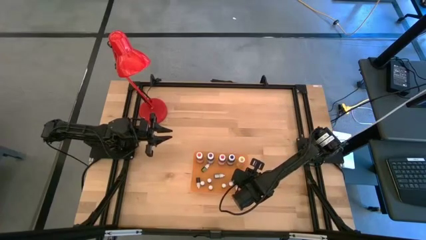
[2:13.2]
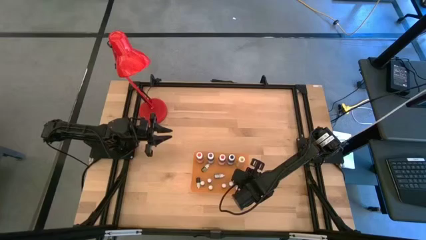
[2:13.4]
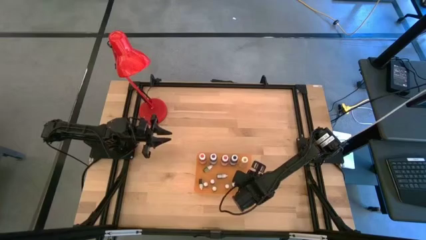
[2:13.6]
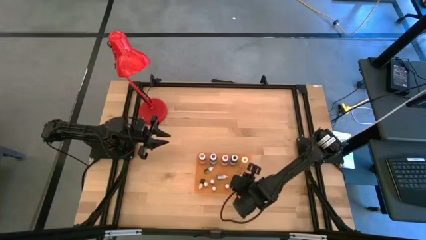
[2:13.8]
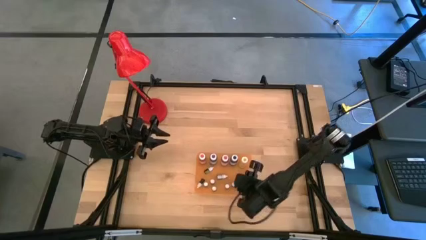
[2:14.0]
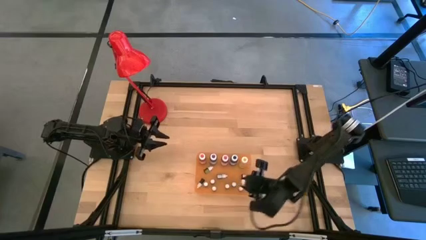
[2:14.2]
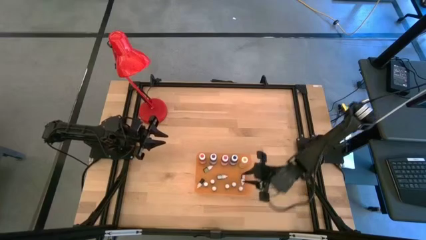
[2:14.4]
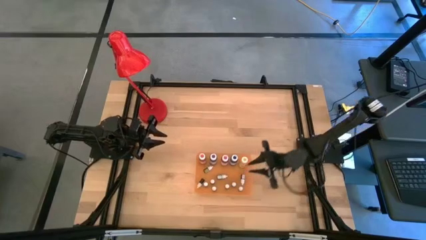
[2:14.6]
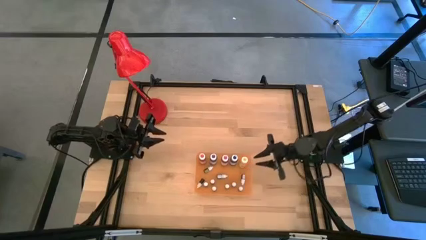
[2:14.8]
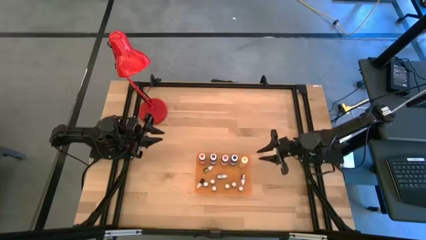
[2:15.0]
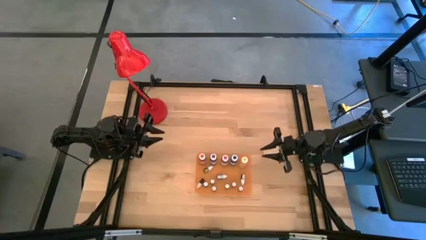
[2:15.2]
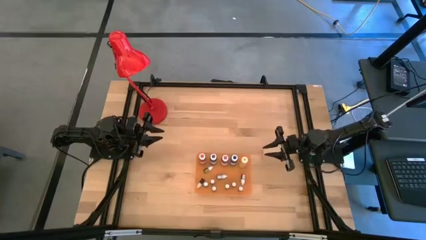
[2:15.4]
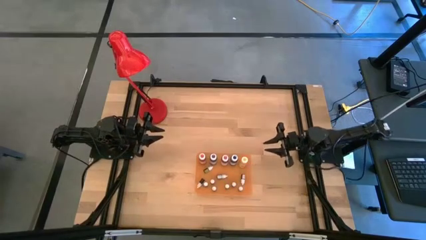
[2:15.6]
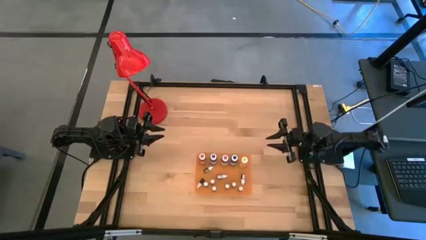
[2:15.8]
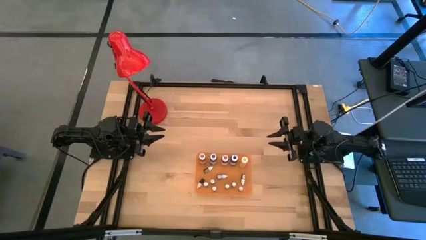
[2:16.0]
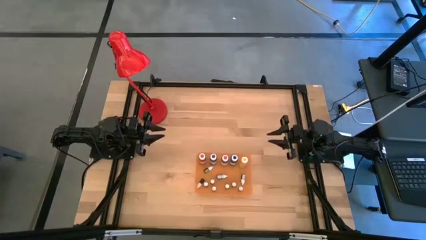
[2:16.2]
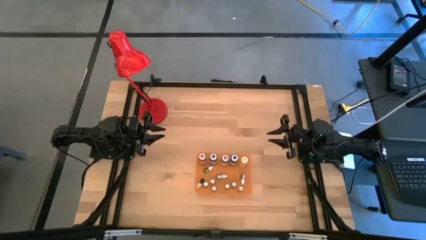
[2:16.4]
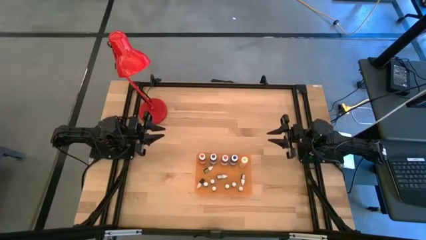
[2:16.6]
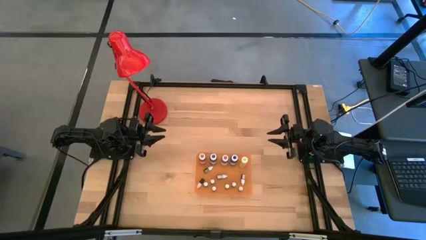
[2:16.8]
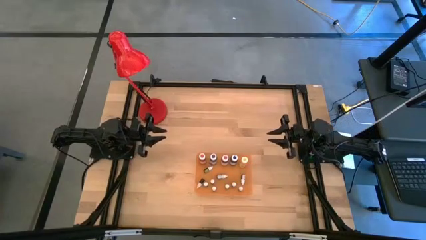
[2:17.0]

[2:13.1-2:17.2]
Task: Pick & Place food coloring
Return to Home Position

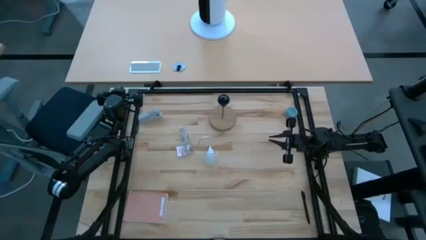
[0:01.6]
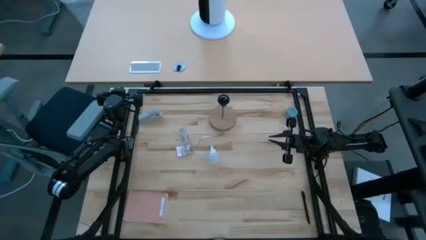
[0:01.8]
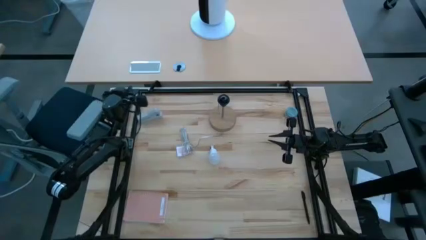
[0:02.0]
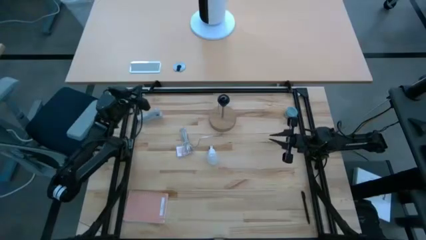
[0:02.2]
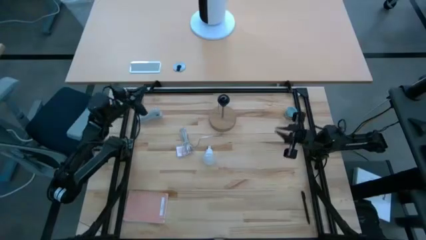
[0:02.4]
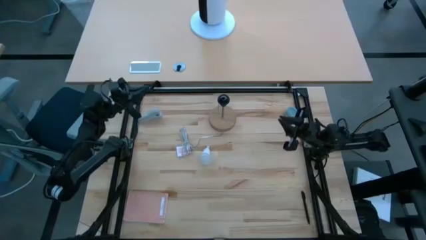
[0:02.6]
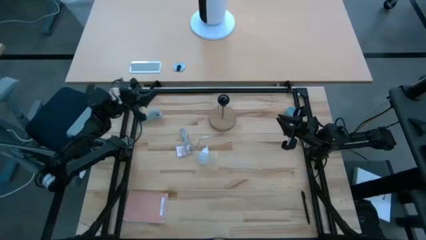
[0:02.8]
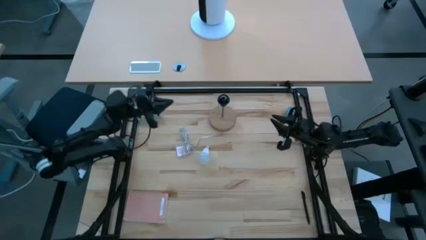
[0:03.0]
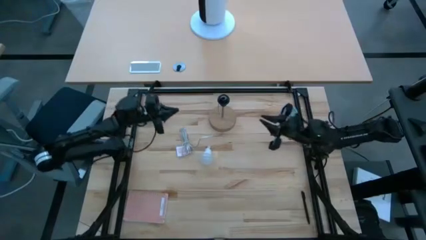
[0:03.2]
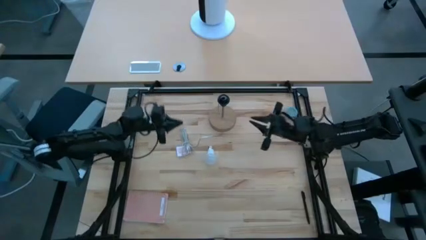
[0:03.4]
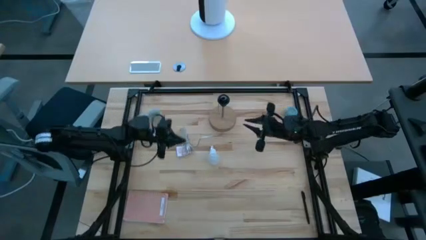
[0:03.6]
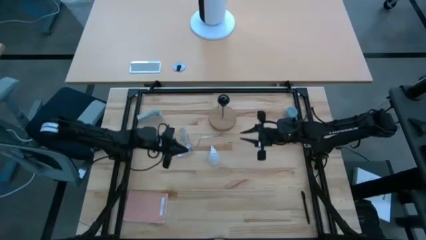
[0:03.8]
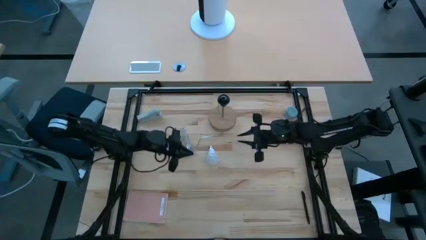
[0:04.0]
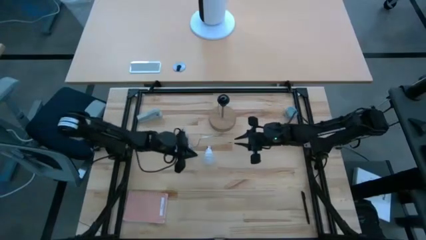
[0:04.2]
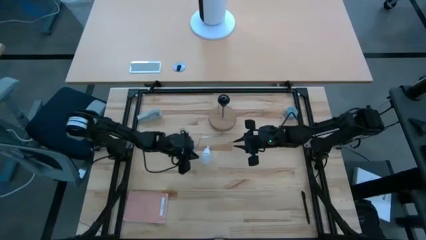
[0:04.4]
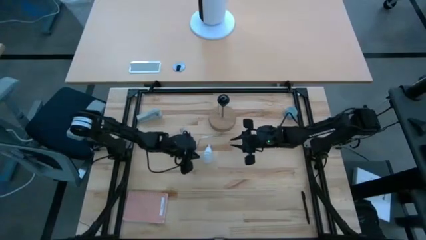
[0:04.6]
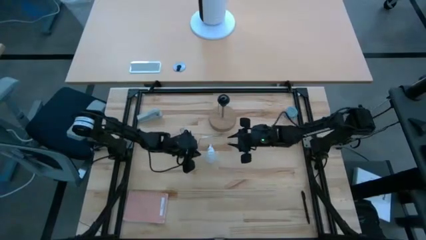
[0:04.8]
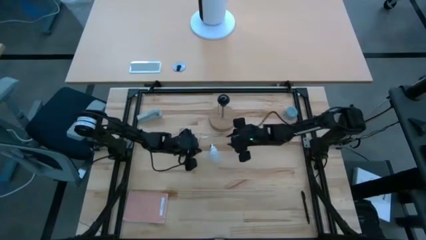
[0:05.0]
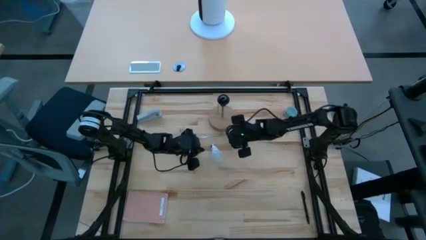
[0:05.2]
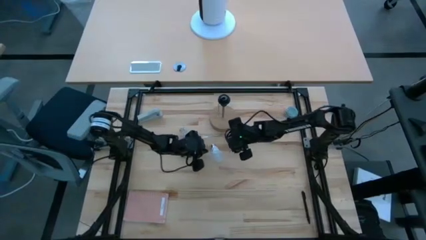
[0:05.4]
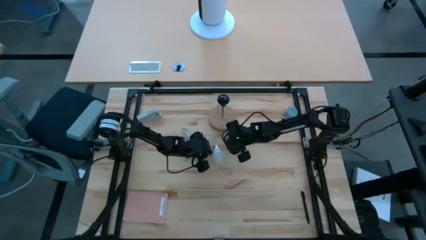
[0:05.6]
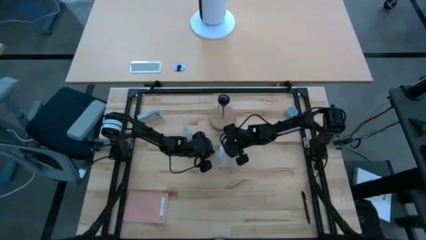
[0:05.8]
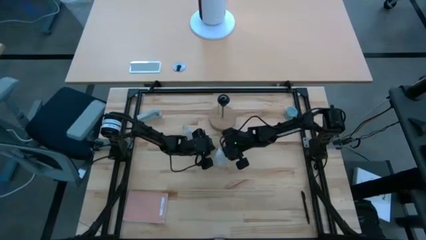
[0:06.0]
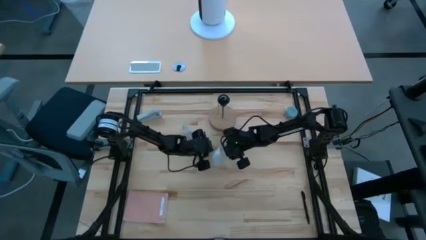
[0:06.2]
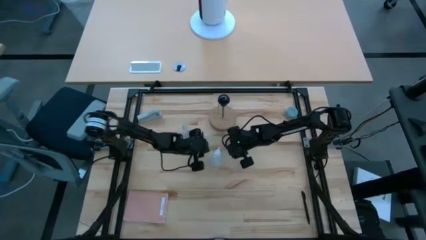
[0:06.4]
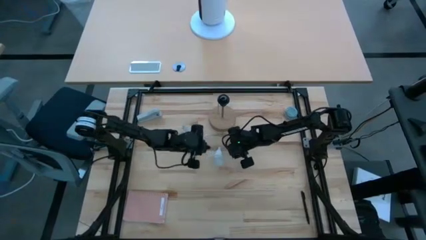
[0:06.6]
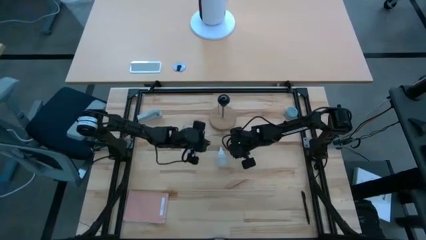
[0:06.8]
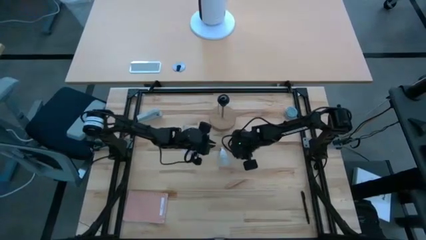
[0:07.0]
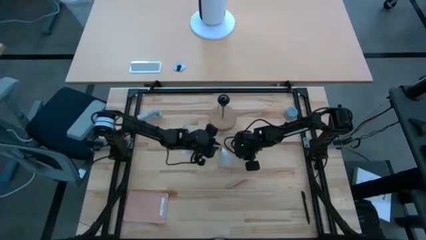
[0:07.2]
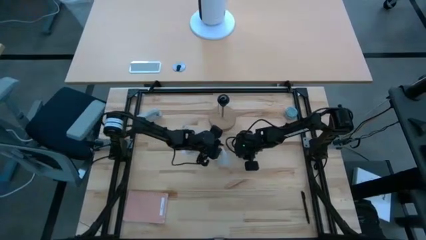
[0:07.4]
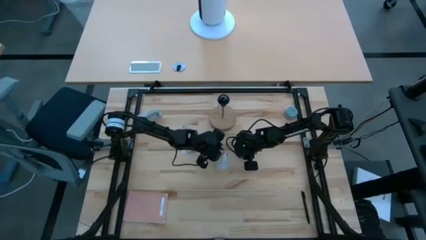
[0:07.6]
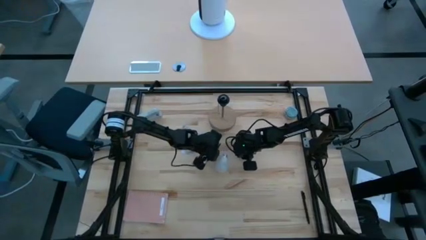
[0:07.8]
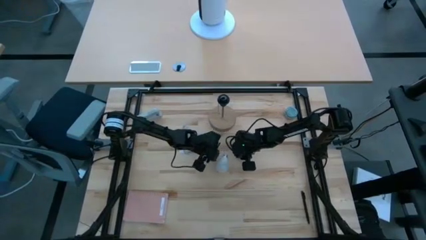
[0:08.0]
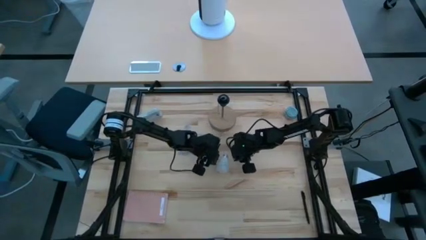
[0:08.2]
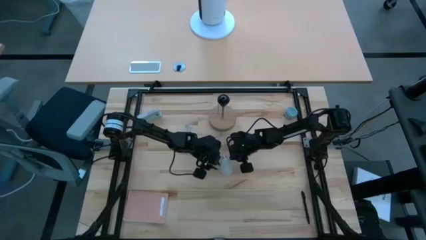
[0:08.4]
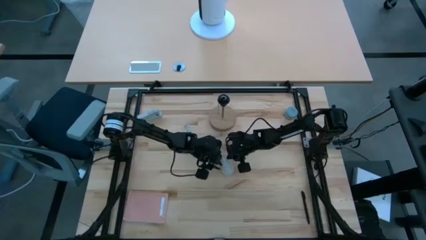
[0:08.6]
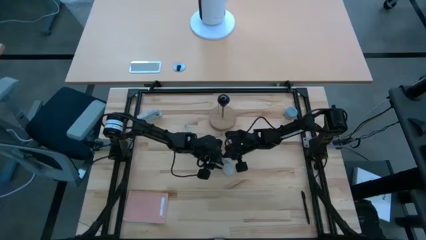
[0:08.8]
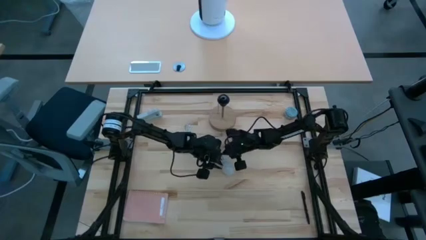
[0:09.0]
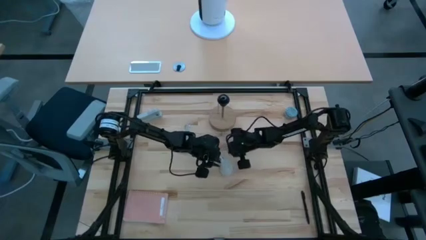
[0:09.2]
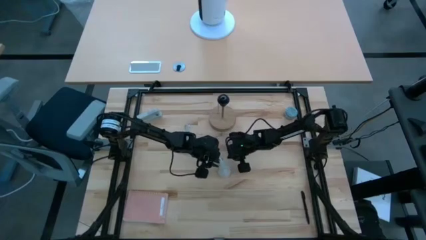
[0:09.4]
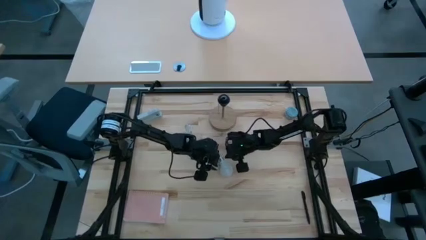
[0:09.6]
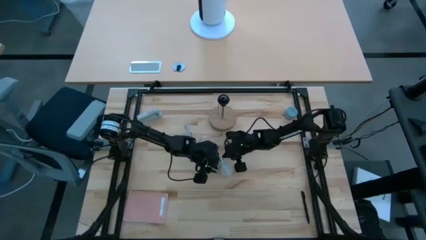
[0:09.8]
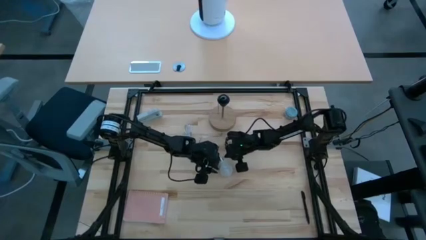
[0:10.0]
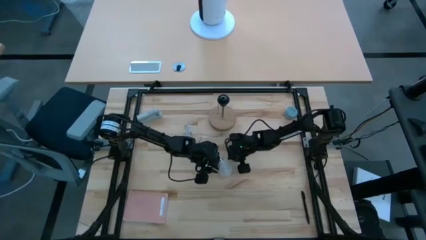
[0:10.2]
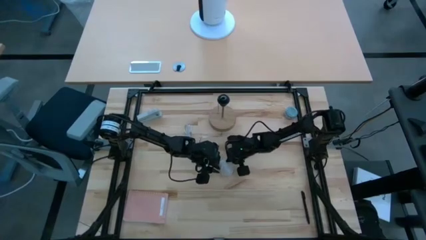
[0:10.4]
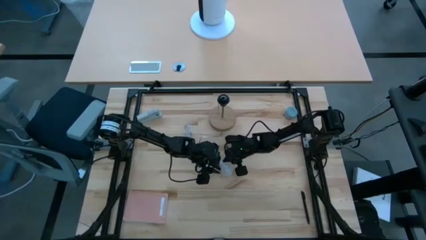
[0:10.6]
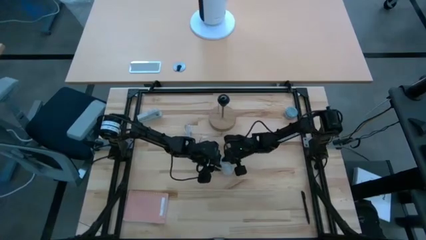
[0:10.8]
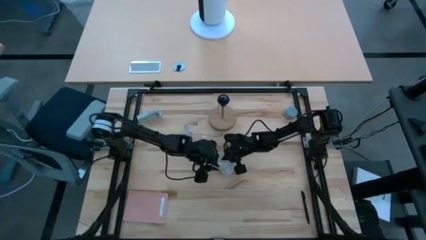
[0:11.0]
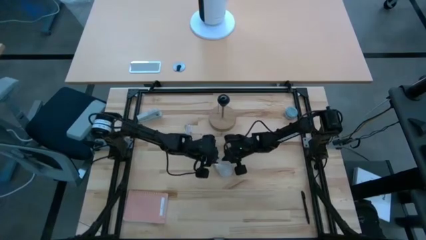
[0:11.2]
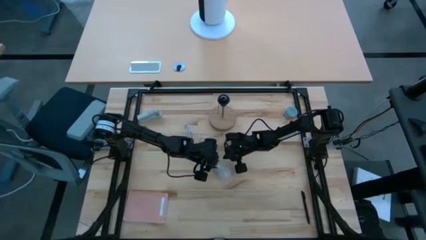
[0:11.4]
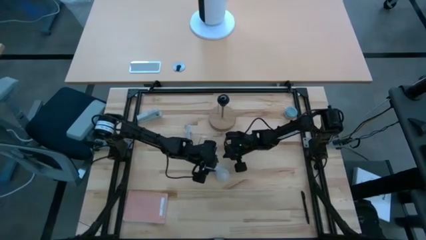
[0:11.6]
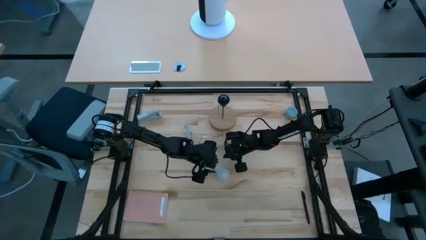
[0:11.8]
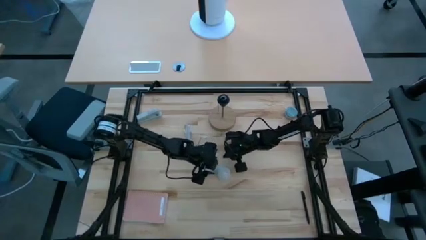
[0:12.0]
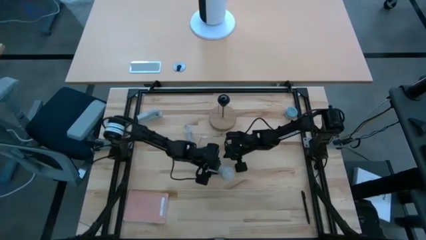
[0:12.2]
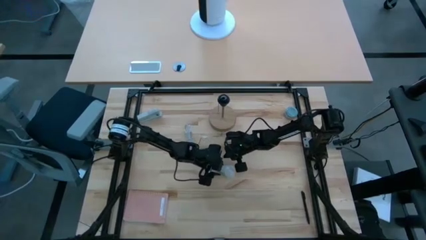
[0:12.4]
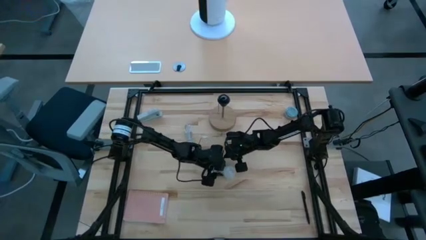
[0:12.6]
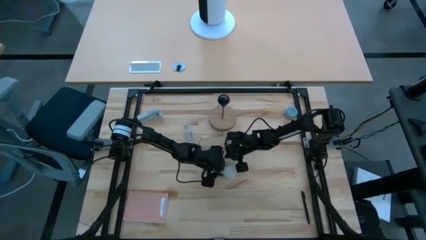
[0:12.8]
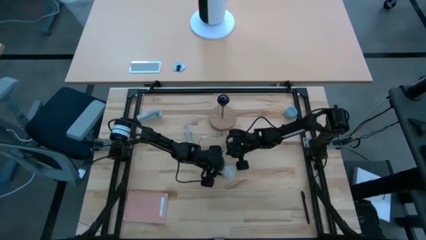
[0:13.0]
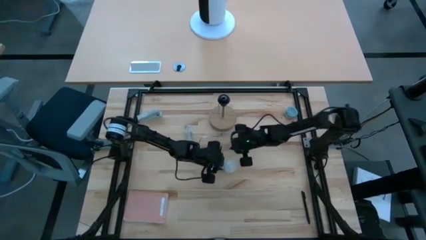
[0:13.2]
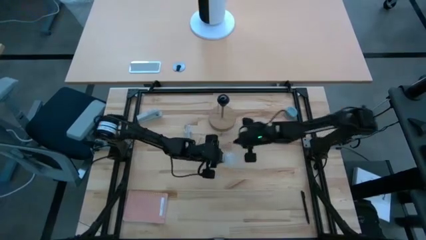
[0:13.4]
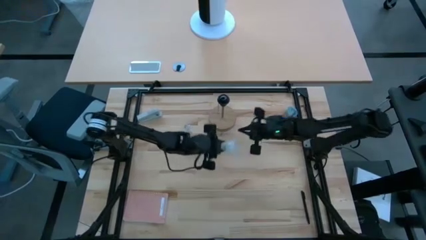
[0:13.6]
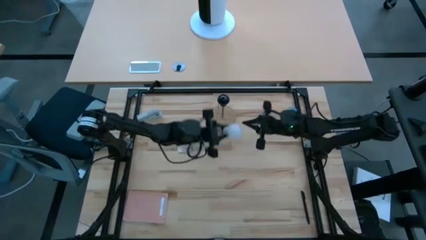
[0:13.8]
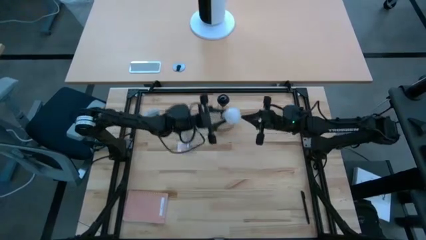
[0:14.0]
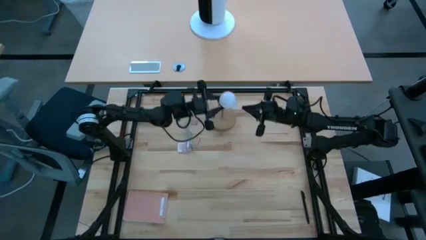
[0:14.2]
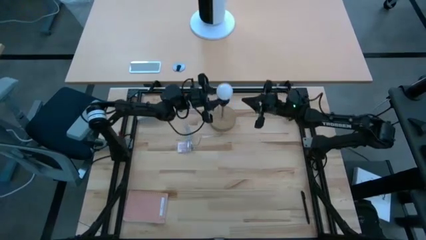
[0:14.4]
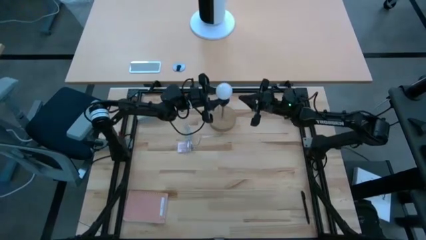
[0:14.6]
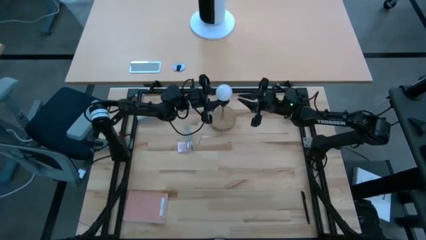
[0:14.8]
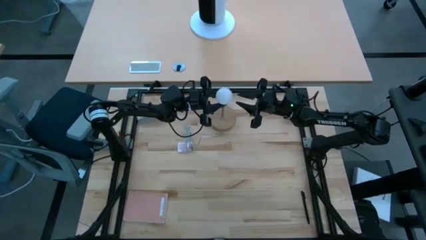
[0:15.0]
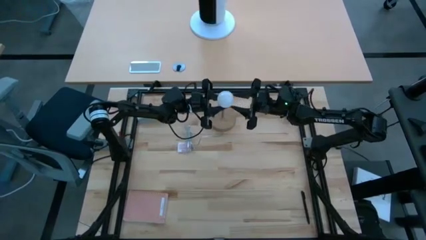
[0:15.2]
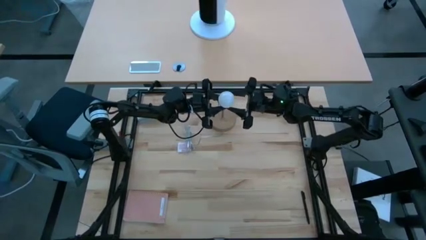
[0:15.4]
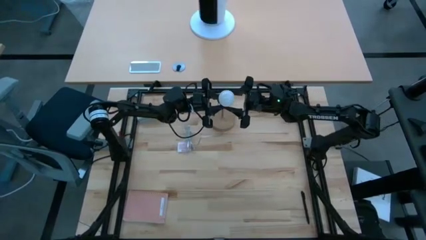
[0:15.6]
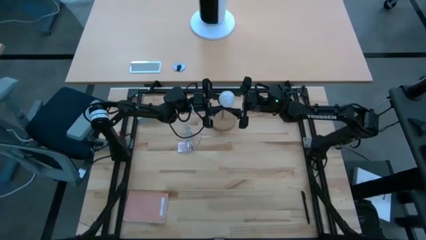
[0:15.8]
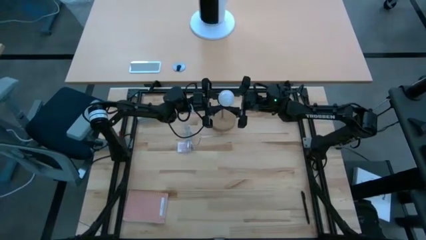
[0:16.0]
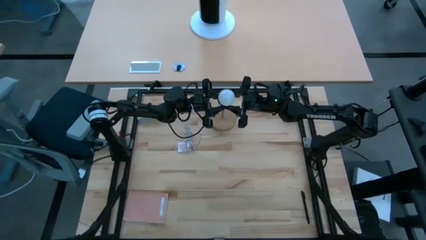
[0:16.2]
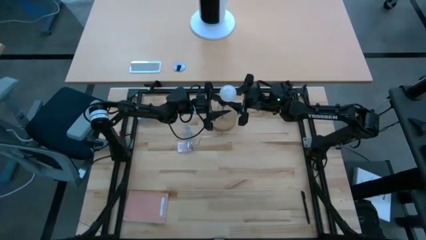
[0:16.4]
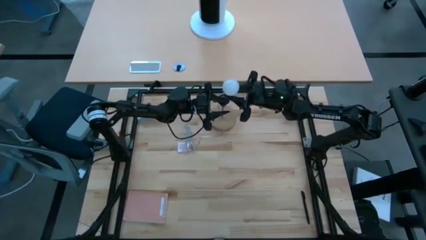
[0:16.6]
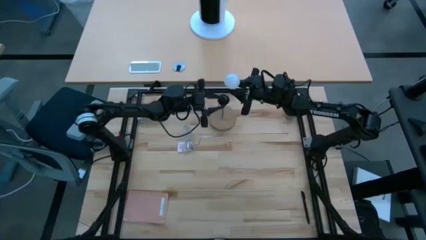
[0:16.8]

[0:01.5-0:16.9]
Task: Screw lightbulb
Insert the lightbulb into the desk lamp
